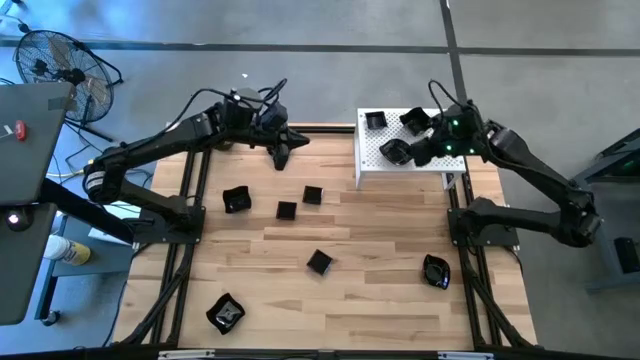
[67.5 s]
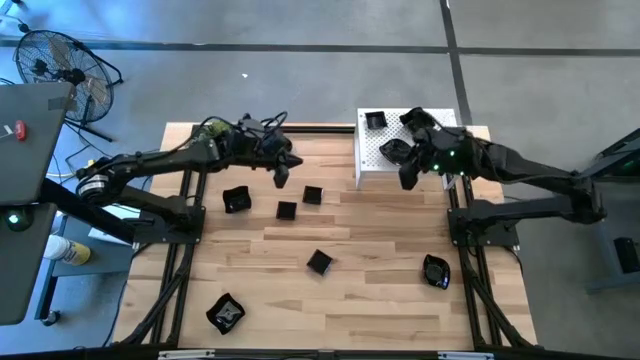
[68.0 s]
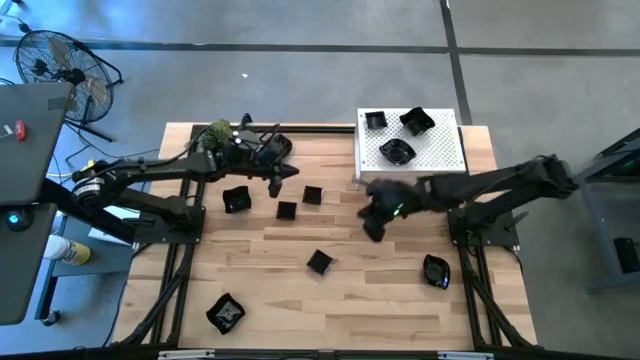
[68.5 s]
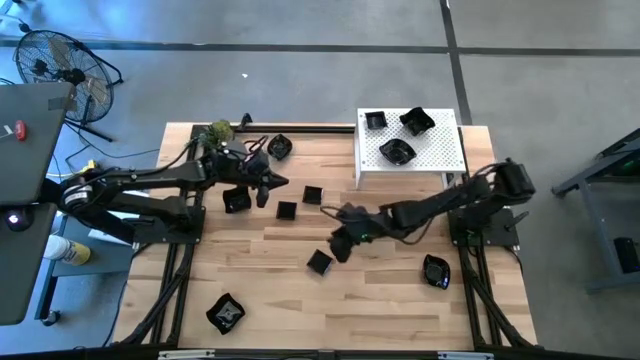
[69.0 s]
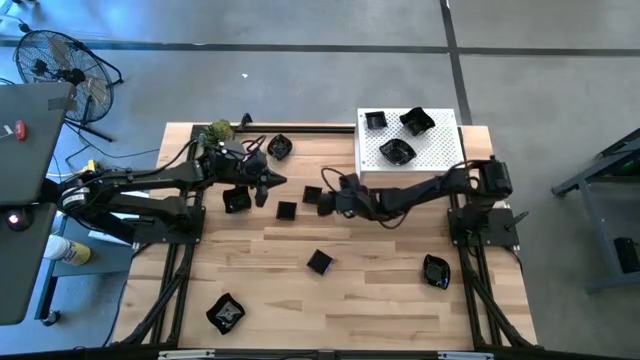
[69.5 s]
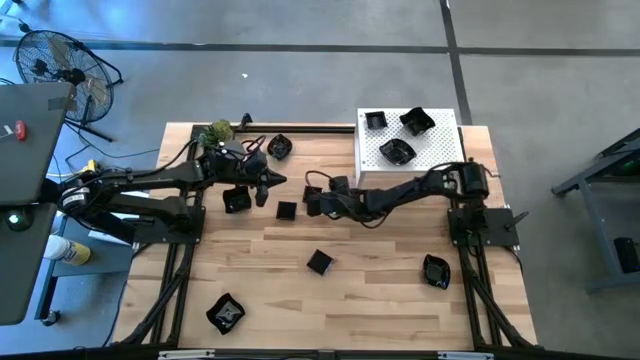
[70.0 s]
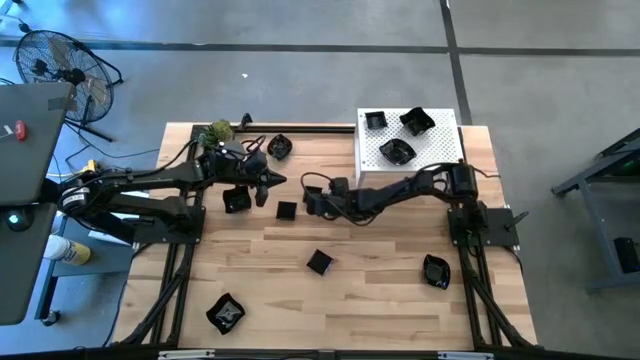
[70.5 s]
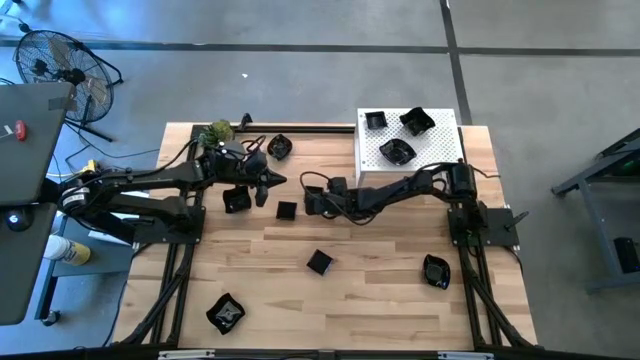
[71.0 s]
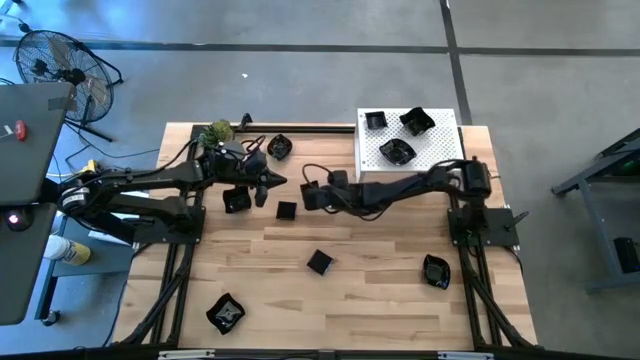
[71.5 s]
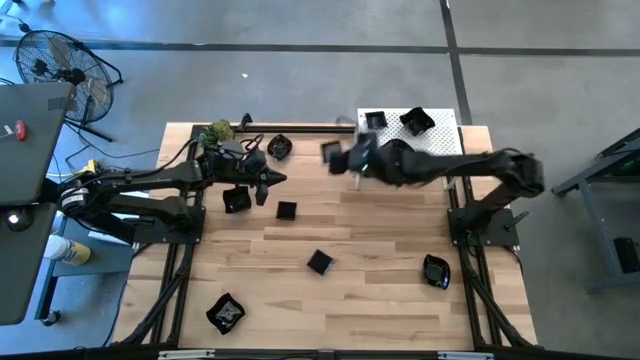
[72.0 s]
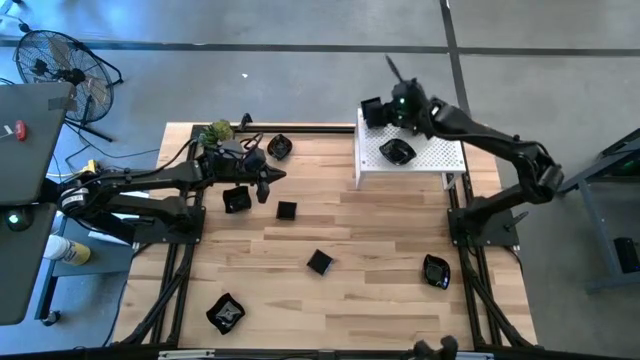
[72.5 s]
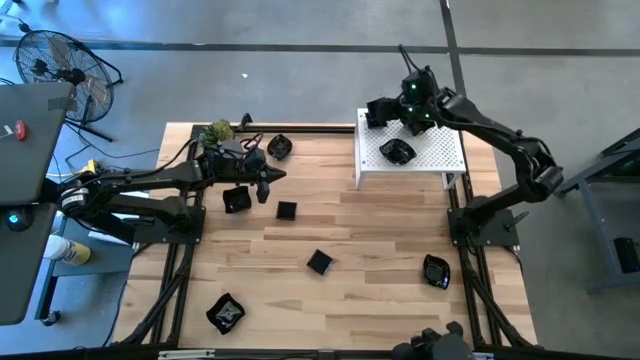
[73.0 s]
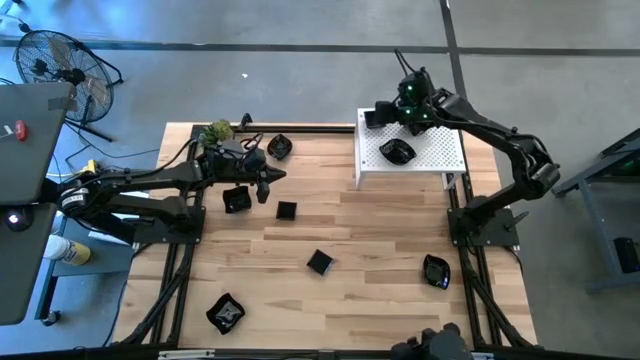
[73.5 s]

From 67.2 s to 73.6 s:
Task: Pick & Place Mini shaped plates
Stack the square plate on top of the square plate on the shelf

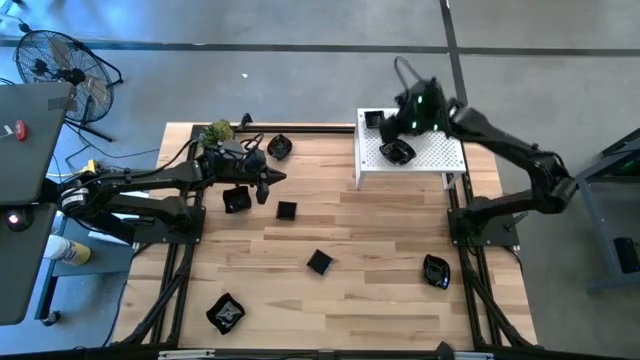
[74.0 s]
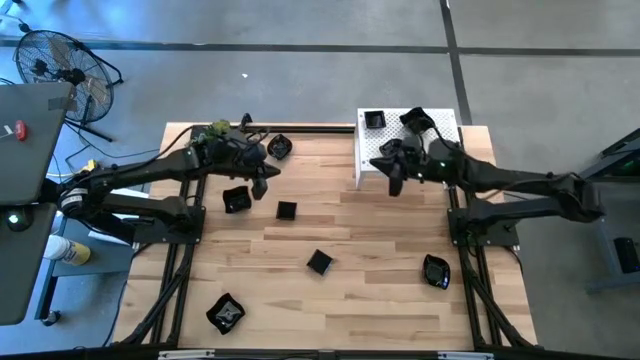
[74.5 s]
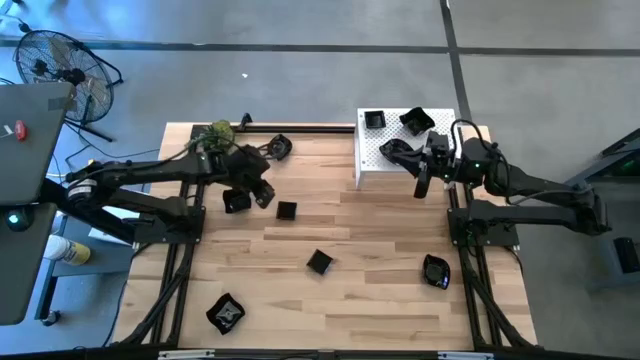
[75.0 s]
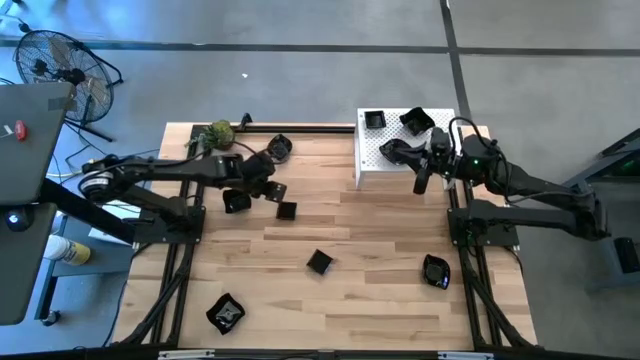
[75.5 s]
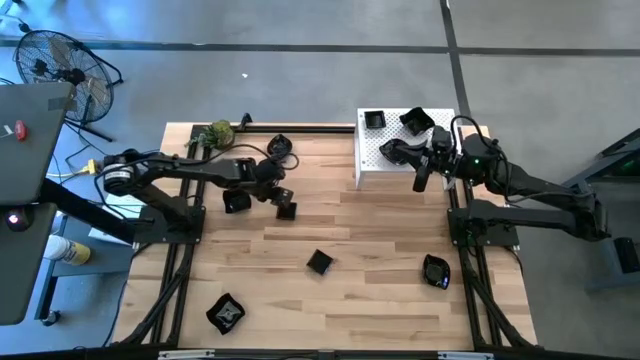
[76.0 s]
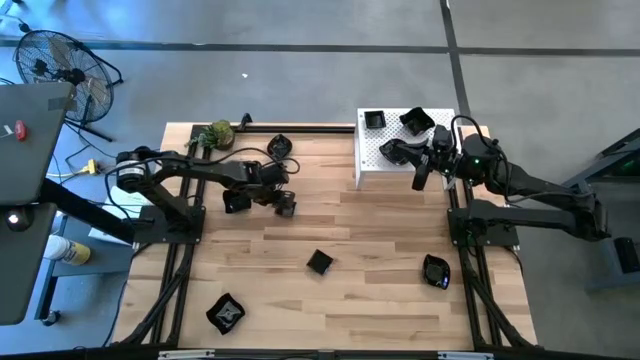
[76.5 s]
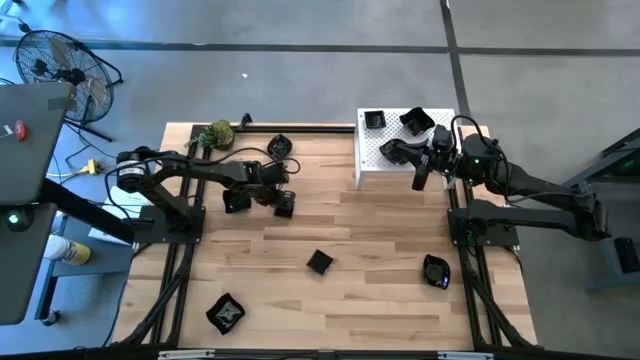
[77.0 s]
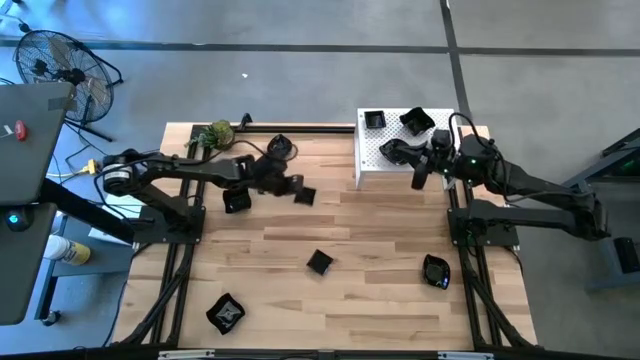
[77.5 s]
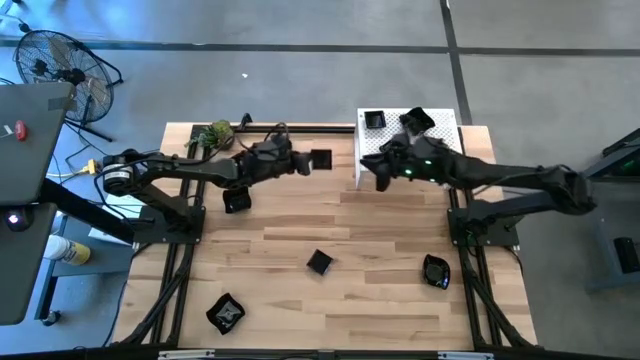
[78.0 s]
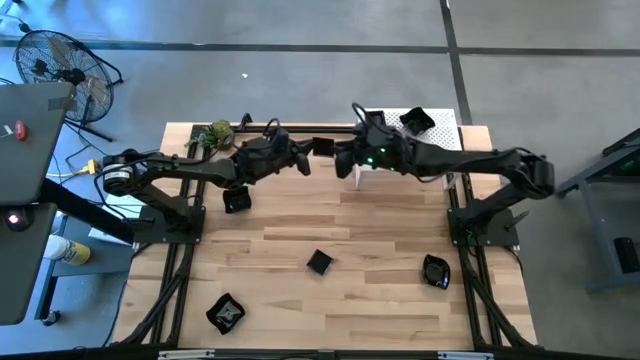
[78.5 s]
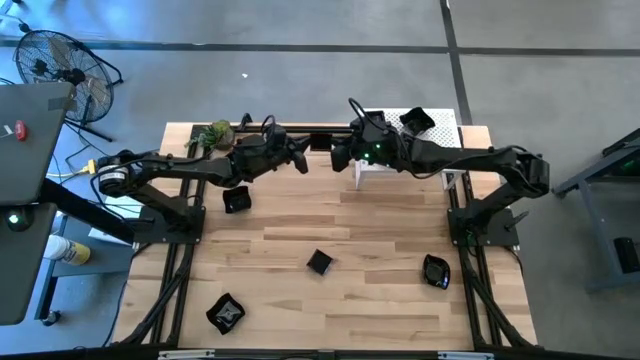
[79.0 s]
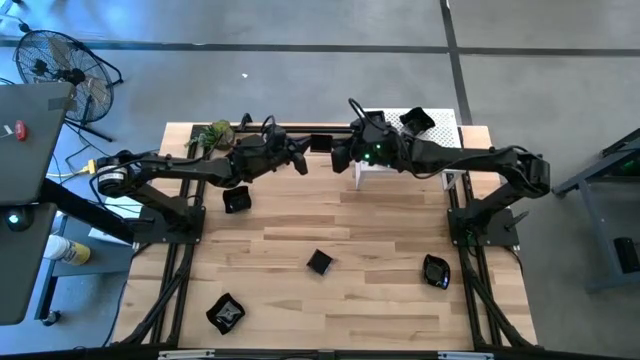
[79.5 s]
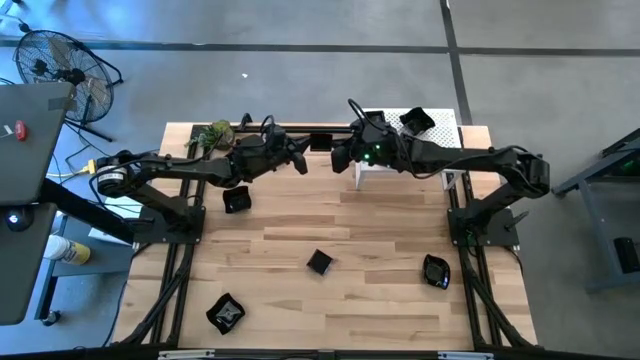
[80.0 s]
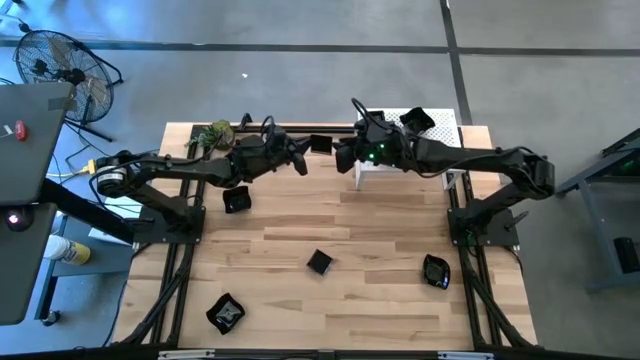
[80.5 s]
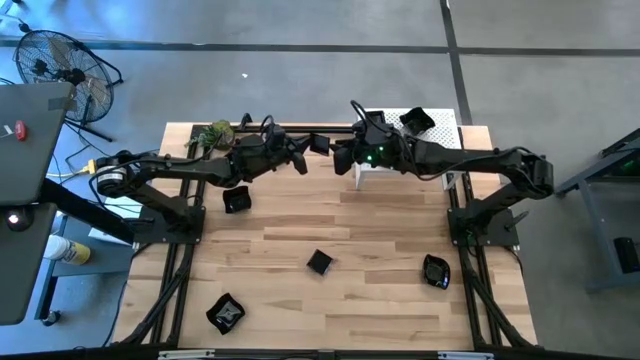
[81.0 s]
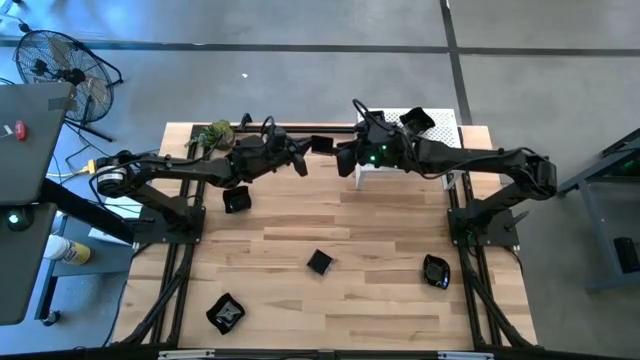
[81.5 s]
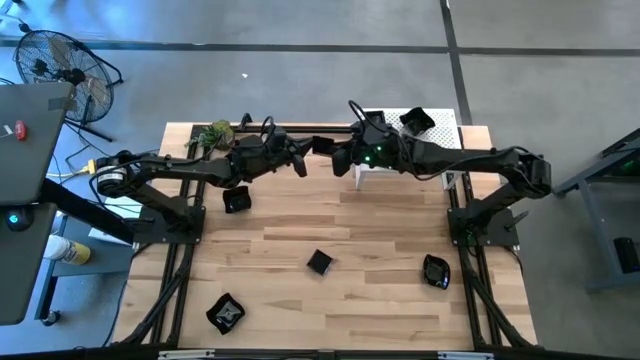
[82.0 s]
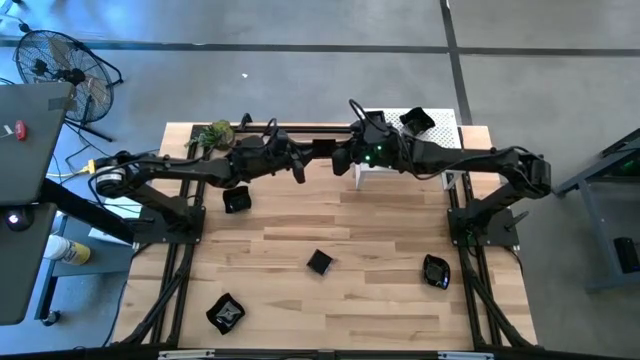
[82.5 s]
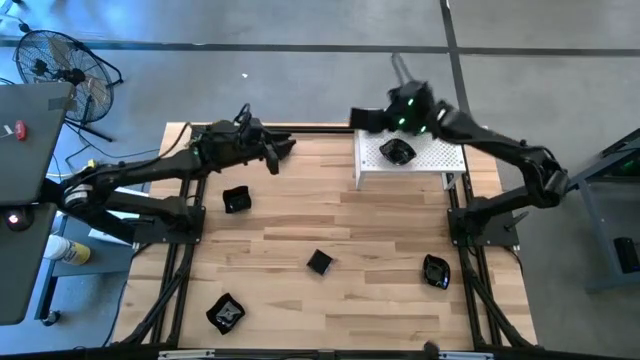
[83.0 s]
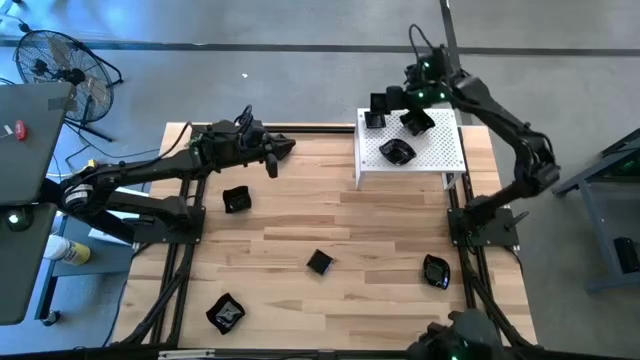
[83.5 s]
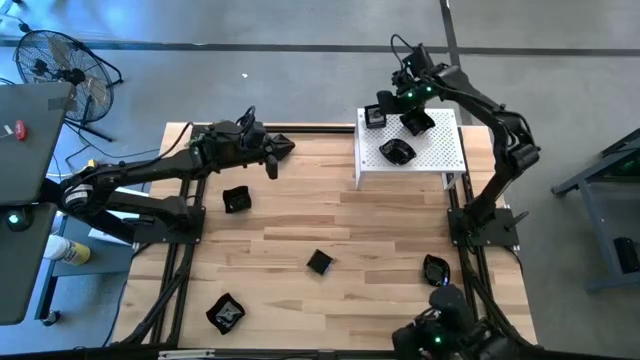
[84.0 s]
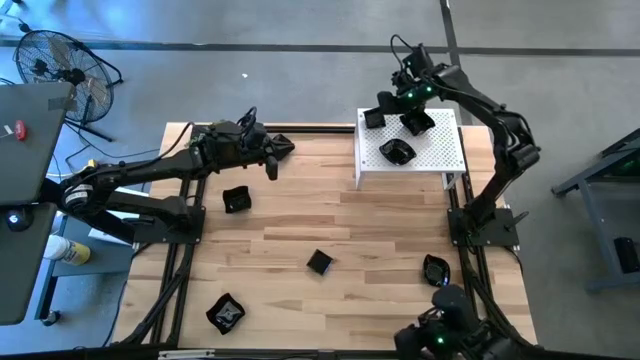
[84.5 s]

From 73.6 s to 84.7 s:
Stack the square plate on top of the stacked square plates on the shelf

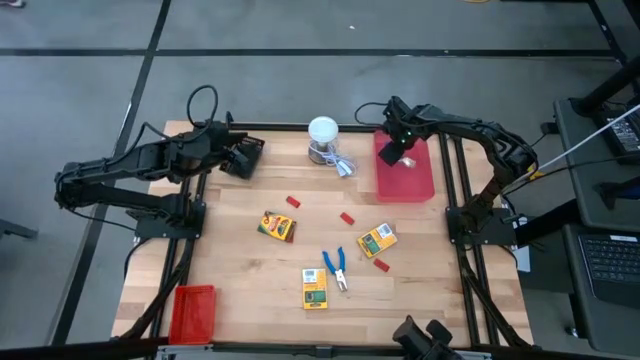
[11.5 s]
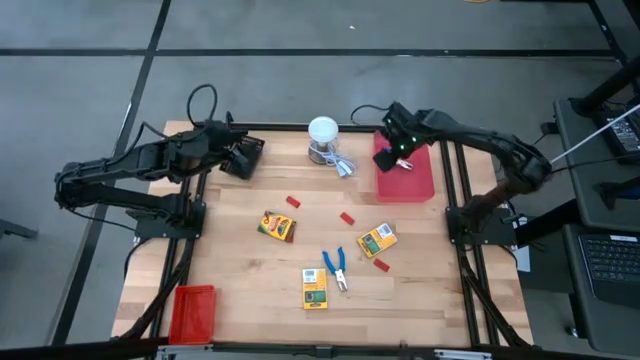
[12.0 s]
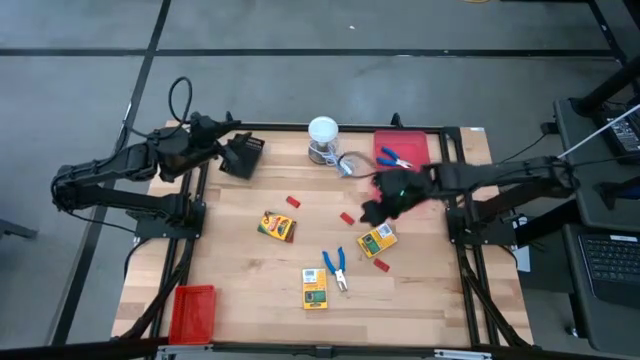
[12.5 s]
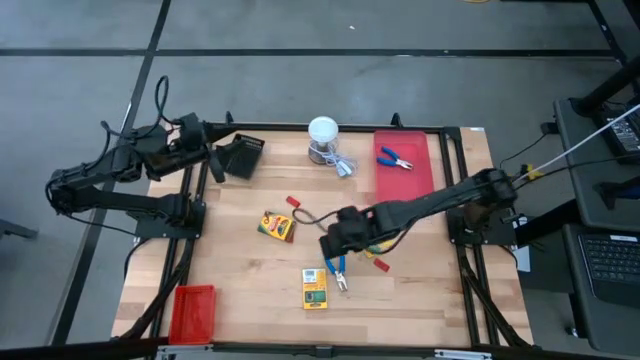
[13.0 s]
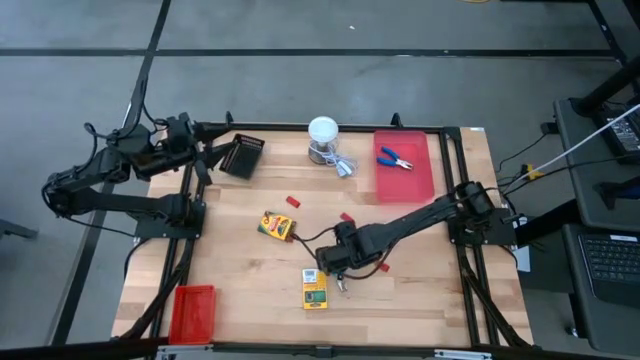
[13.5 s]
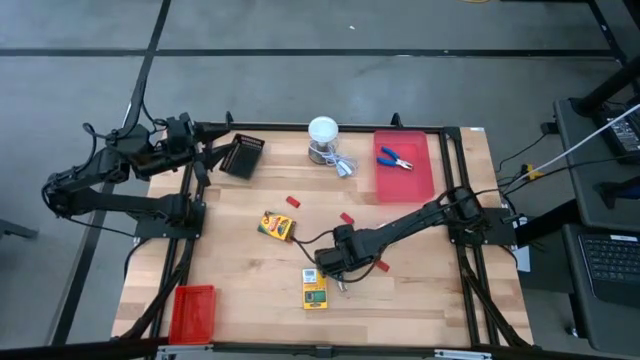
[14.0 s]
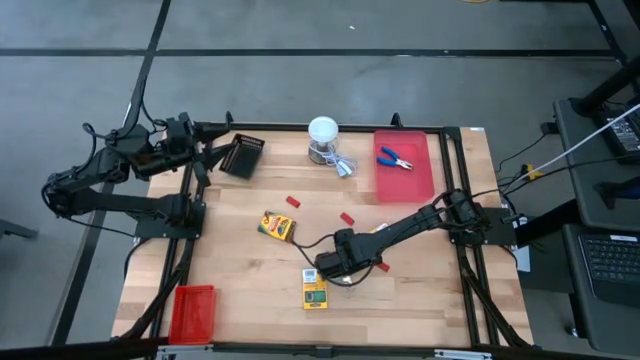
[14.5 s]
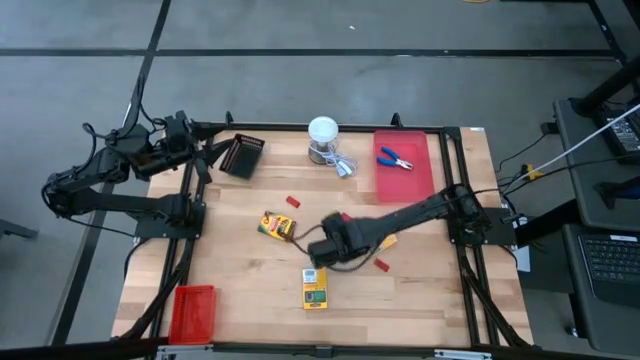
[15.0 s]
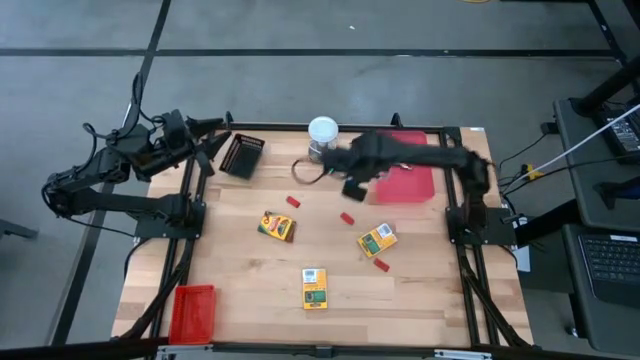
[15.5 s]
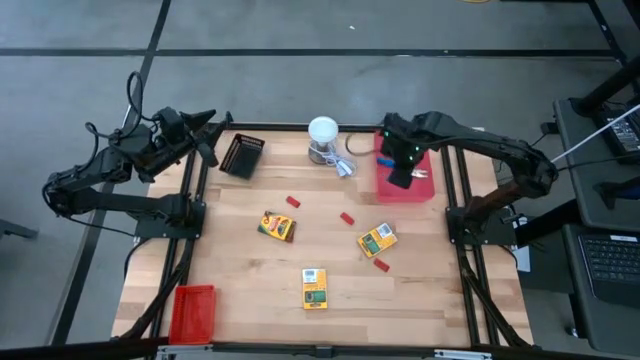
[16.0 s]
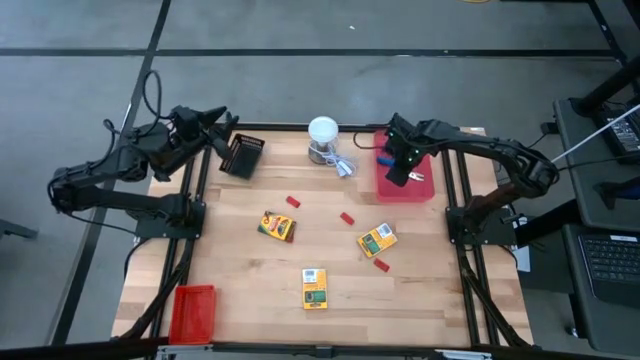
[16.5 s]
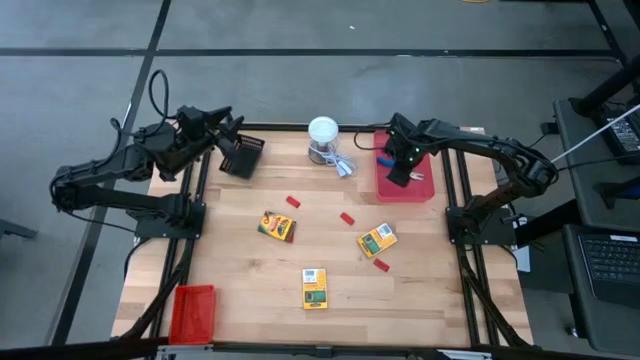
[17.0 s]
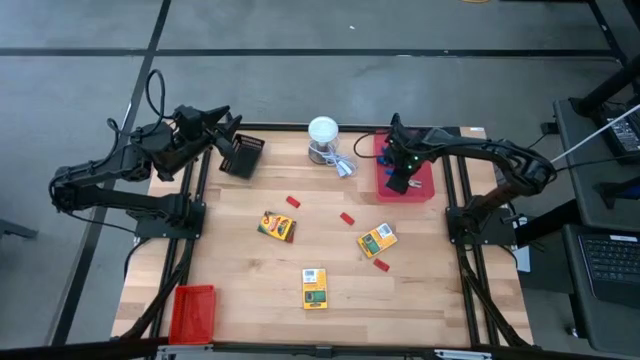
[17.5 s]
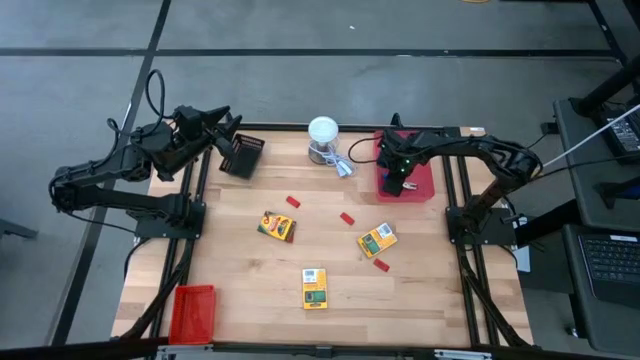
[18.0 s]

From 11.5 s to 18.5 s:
Task: Pick & Place School Supplies
Put the blue puncher into the pink bin
